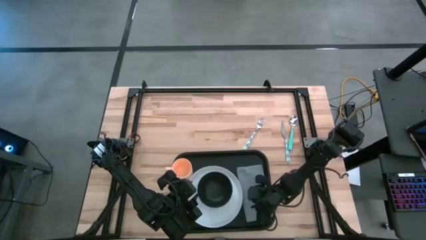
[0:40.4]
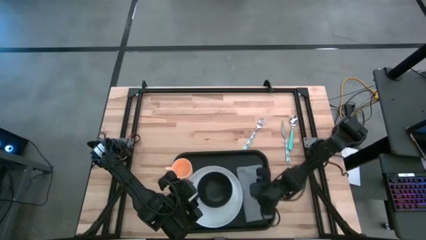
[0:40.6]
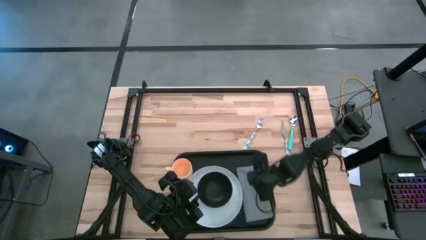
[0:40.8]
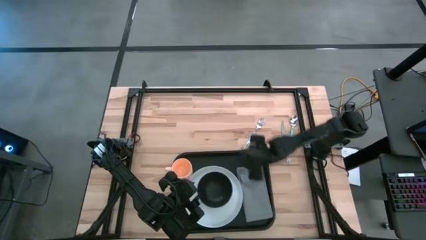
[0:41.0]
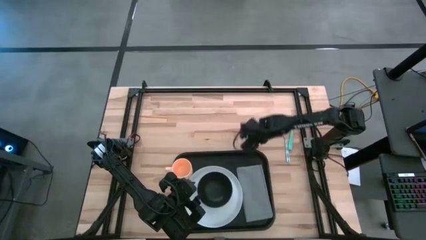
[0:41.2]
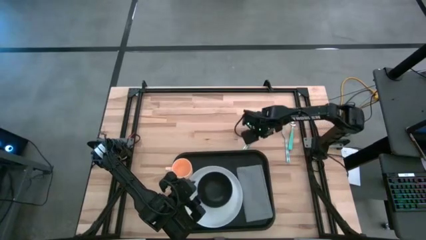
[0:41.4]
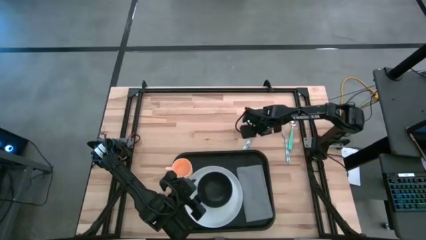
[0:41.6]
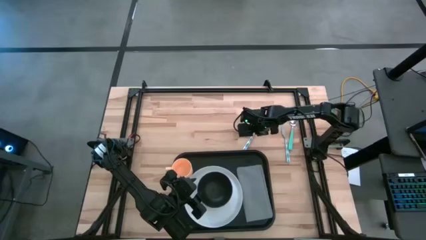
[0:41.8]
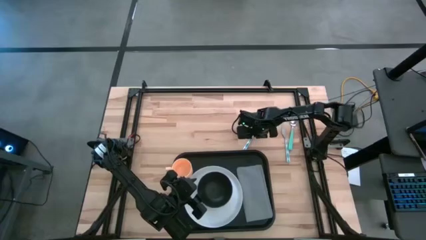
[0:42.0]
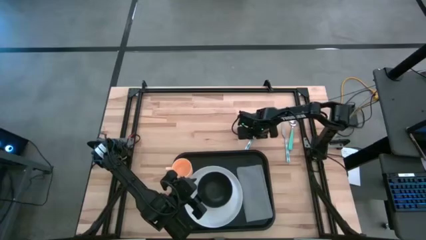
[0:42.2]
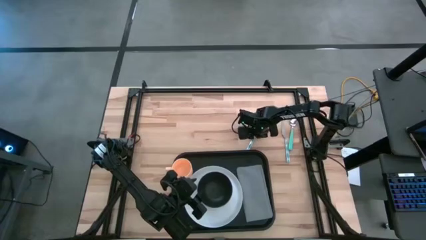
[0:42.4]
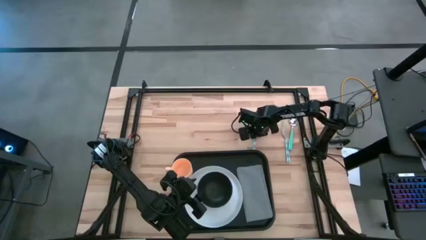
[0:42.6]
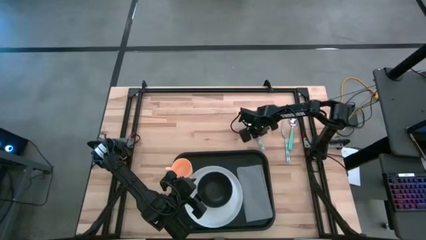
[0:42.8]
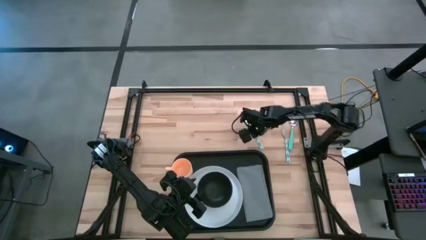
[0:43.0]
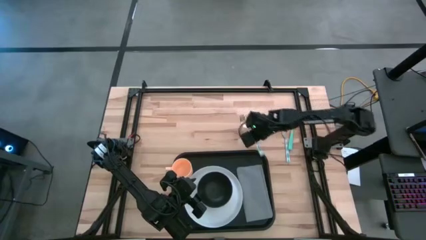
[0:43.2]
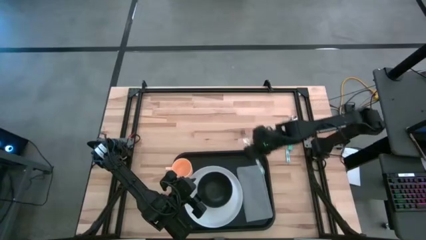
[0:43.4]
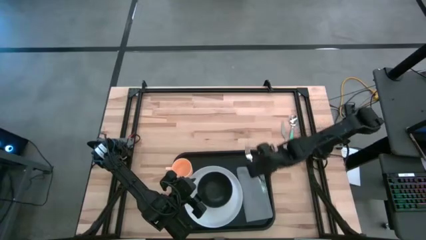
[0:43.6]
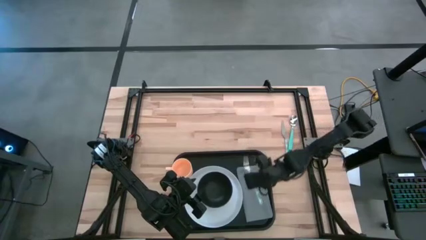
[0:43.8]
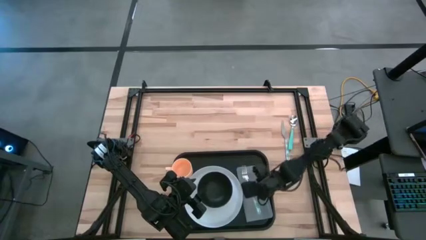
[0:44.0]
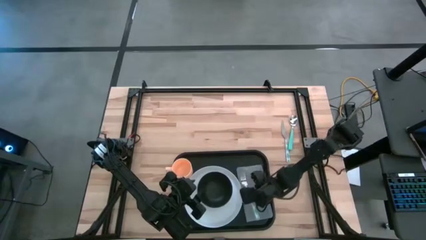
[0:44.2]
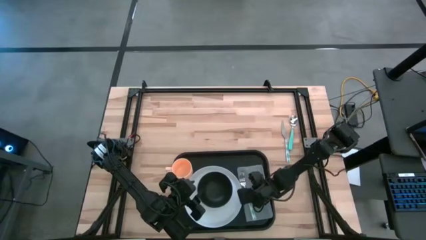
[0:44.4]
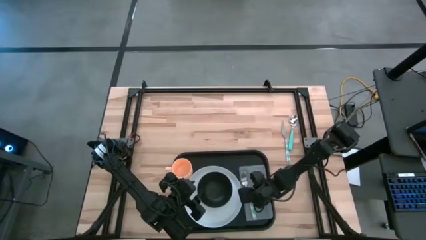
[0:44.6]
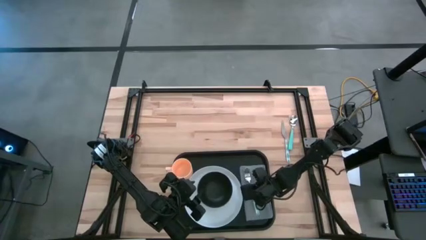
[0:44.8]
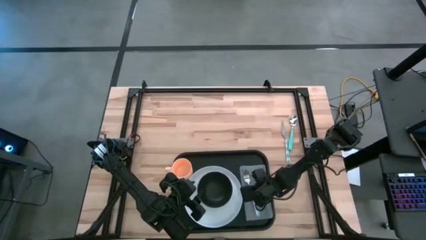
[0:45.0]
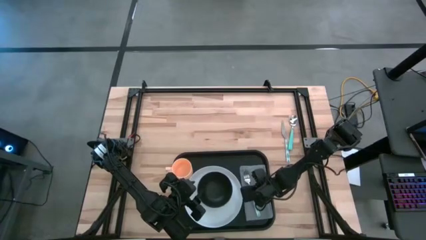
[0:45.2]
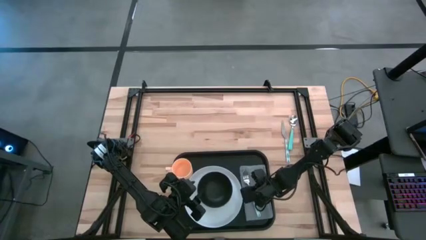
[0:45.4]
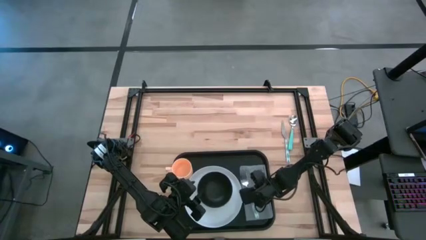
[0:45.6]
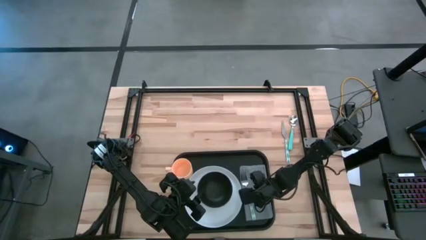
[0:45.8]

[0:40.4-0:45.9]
Task: Set up tray
Put the blue fork on top of the gray napkin on the black serving tray

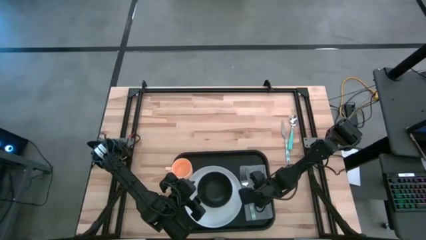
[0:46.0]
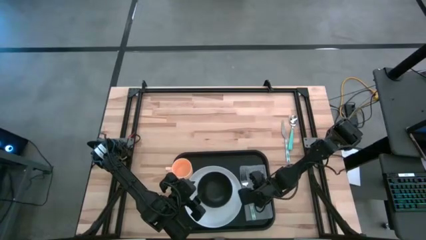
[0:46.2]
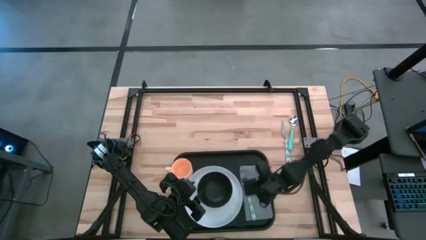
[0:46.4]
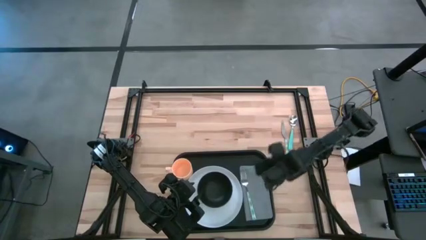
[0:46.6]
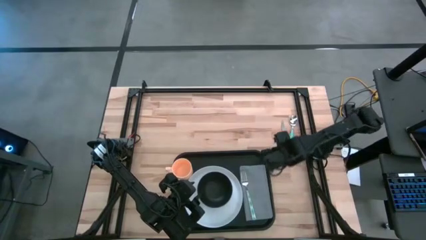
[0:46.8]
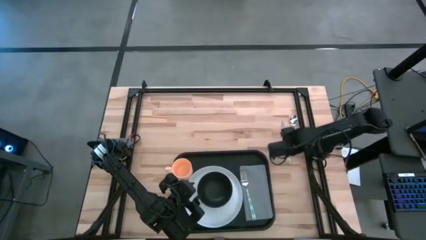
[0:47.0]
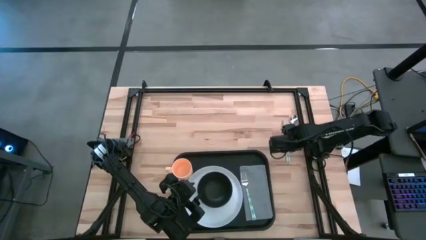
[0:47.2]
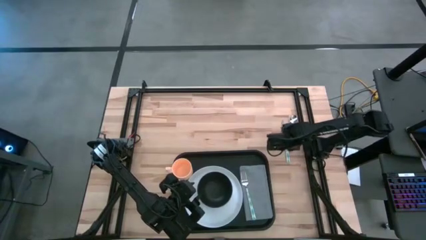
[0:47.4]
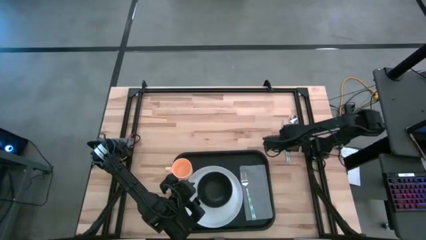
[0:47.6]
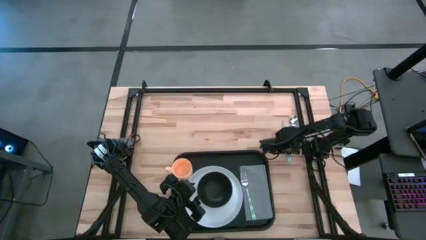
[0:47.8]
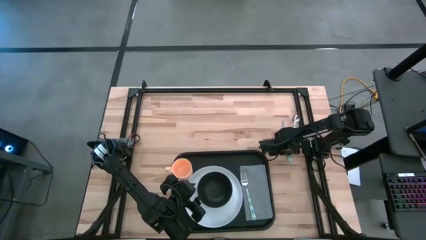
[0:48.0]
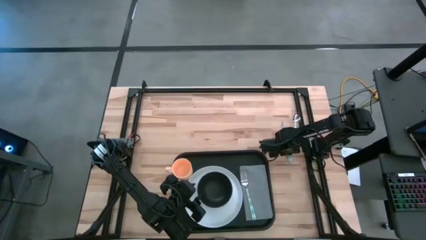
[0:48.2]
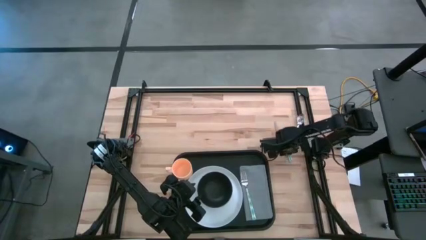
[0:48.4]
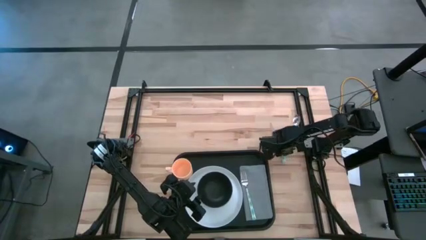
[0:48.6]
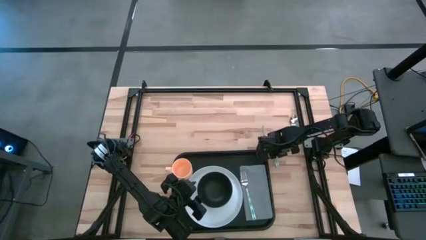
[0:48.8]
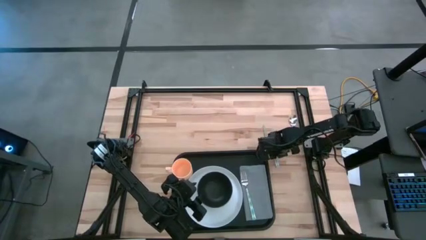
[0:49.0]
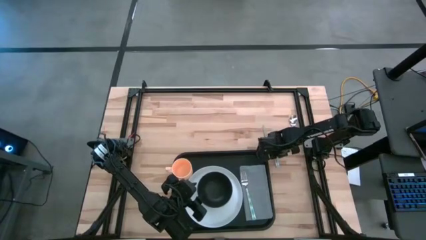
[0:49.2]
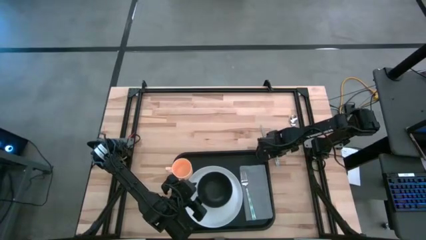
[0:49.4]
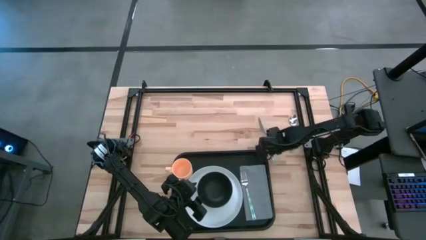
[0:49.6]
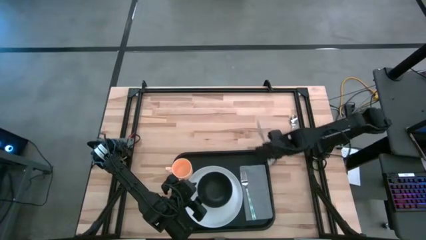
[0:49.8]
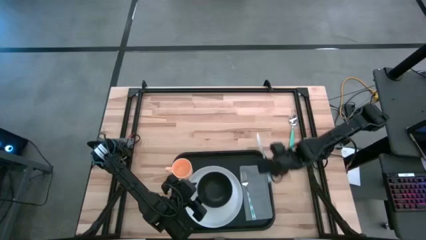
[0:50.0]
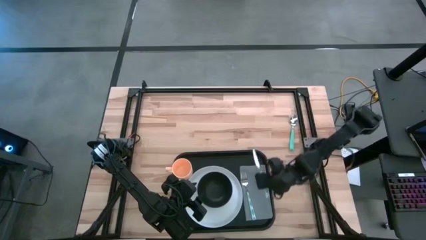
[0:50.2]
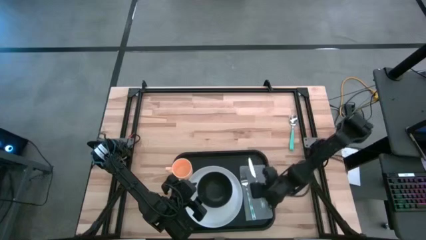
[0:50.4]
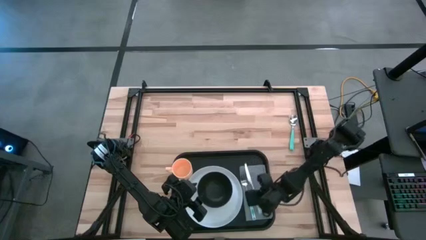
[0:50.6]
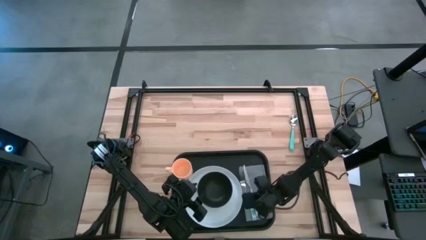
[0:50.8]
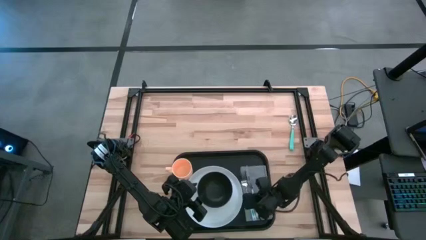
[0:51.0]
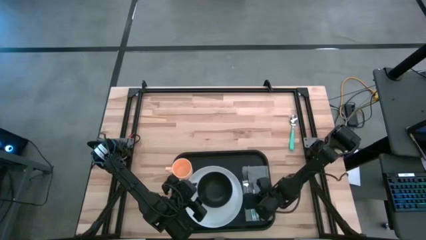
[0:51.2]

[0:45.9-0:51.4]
Put the knife on the middle right of the gray towel

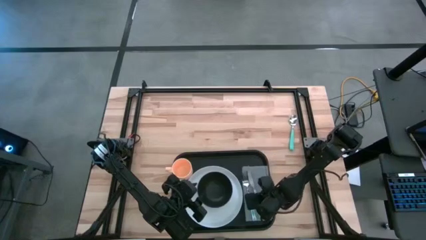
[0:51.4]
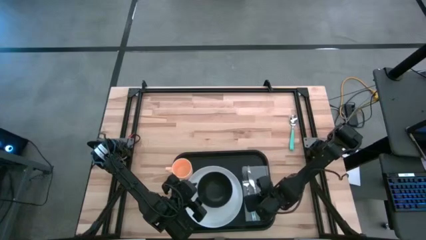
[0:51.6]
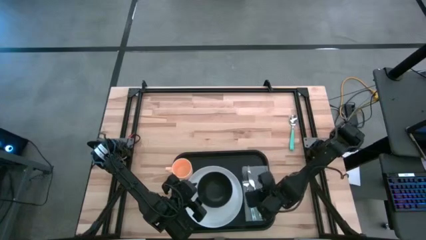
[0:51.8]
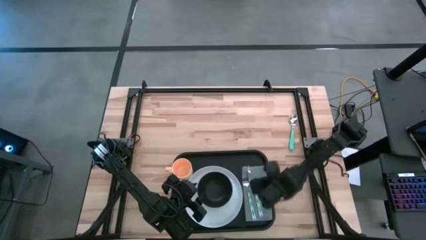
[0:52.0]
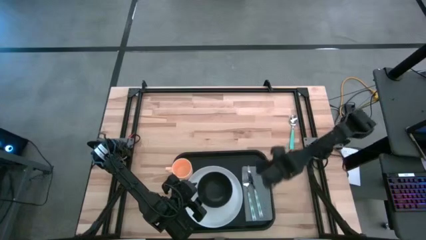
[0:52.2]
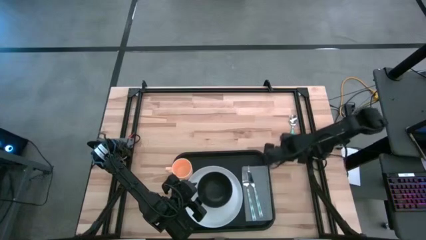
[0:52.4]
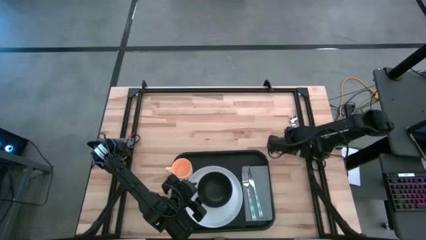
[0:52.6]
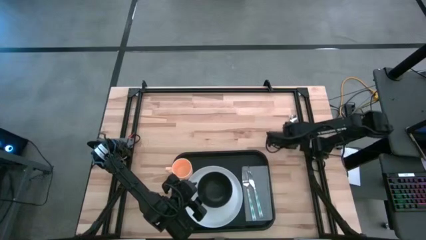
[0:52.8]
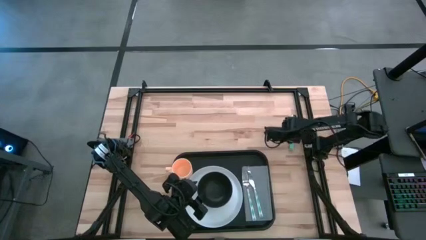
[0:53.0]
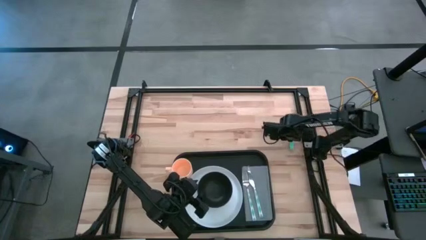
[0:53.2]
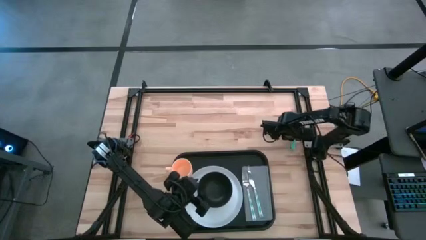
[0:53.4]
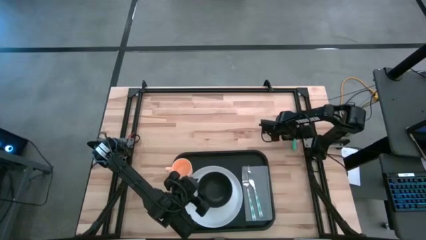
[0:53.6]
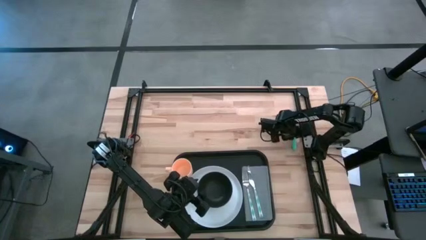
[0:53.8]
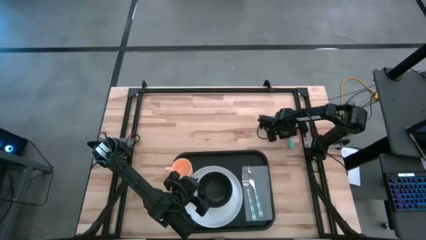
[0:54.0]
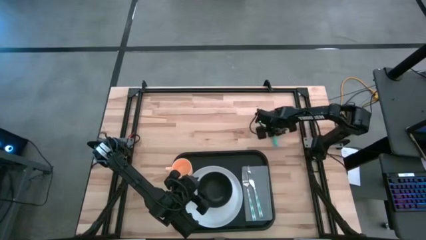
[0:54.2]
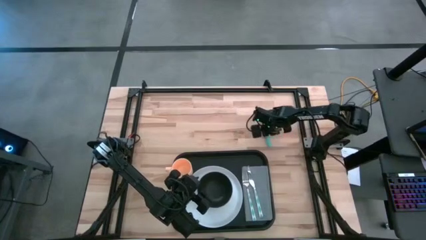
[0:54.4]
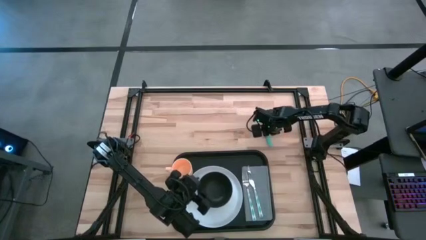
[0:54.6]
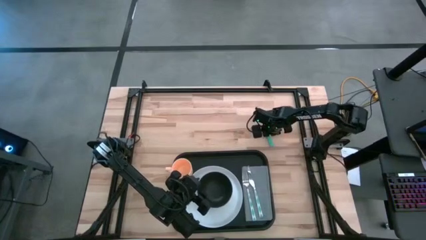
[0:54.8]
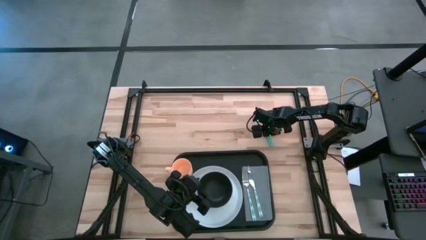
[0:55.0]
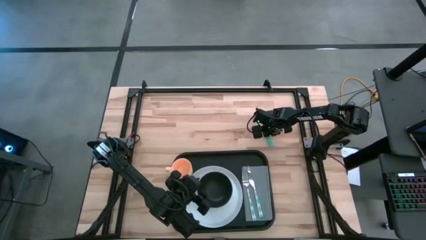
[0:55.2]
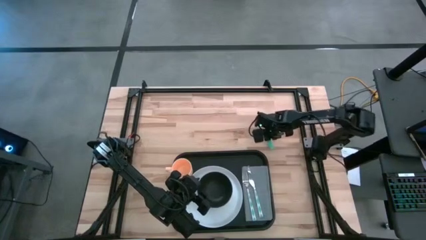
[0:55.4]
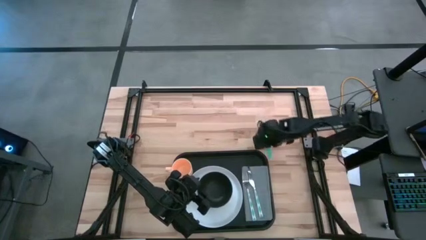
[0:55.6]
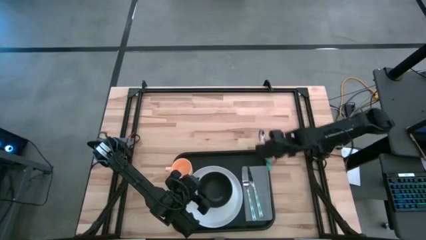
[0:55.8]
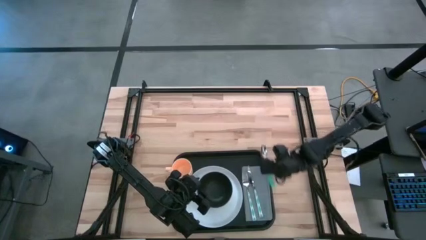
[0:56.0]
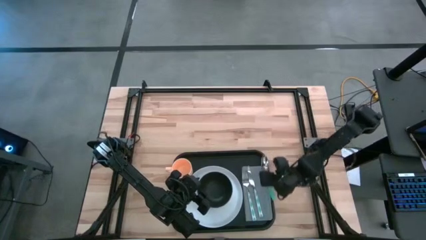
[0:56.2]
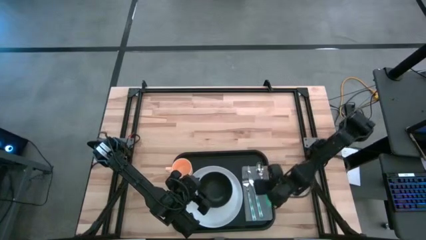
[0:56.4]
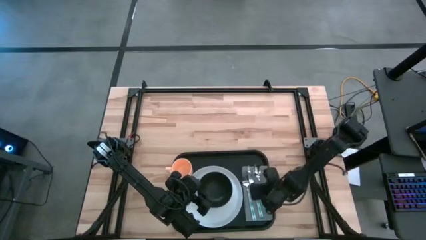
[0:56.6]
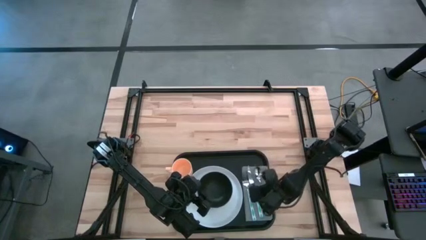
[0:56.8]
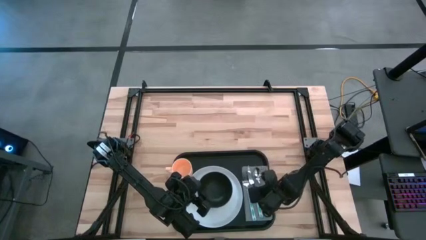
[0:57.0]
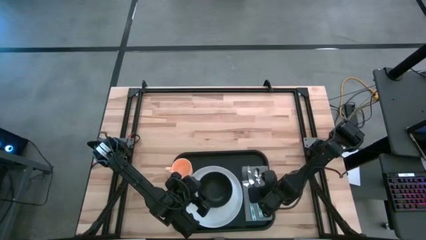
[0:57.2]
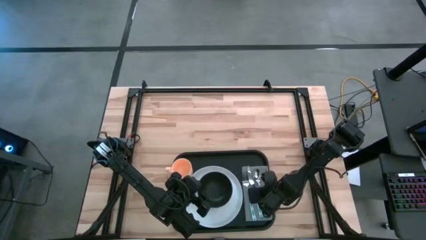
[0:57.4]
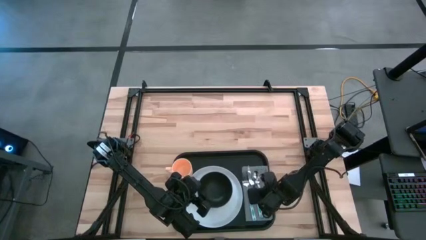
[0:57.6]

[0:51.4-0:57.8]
Put the blue spoon on the right of the knife on the black serving tray
